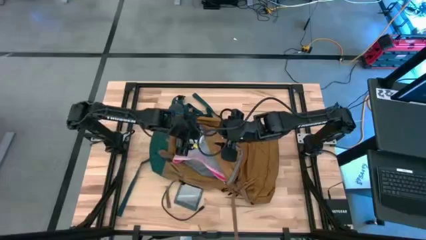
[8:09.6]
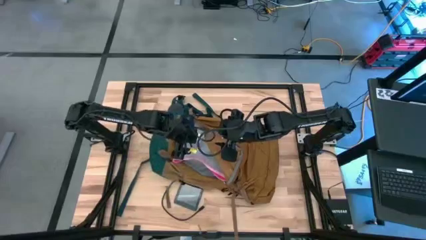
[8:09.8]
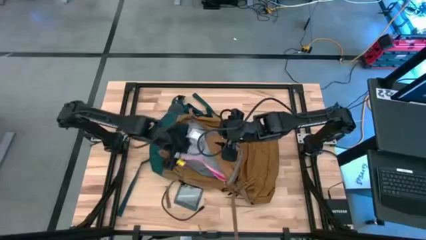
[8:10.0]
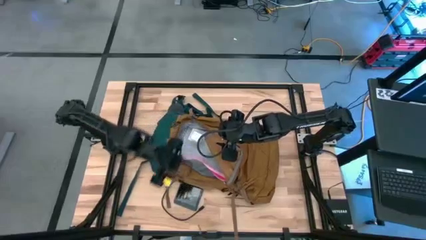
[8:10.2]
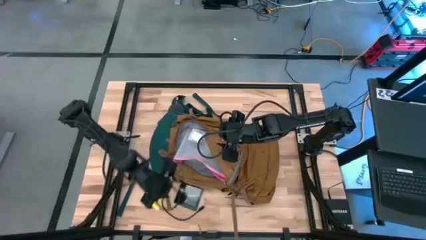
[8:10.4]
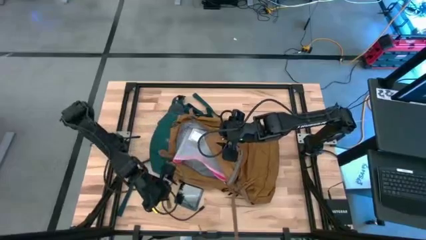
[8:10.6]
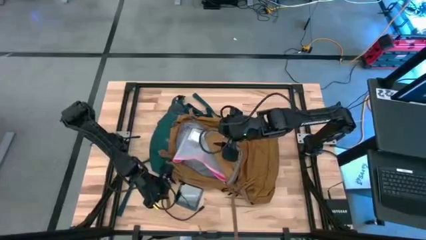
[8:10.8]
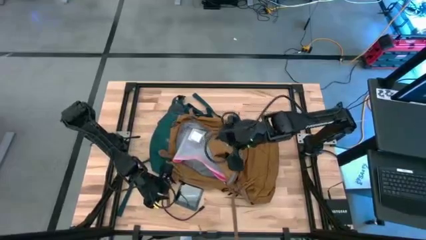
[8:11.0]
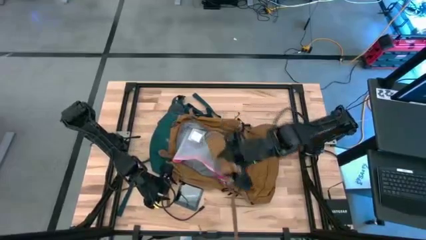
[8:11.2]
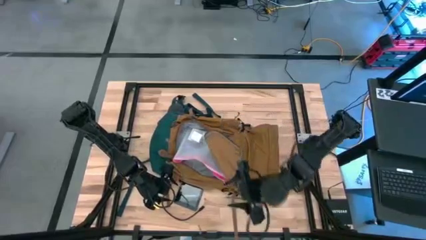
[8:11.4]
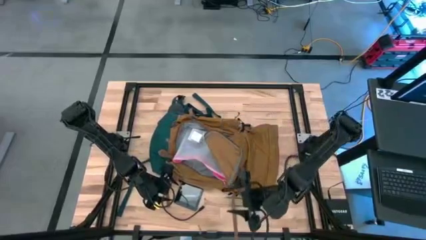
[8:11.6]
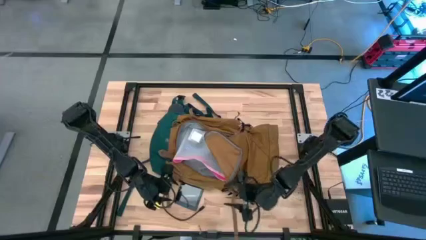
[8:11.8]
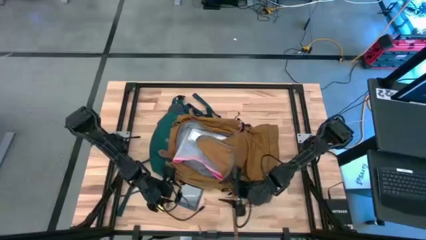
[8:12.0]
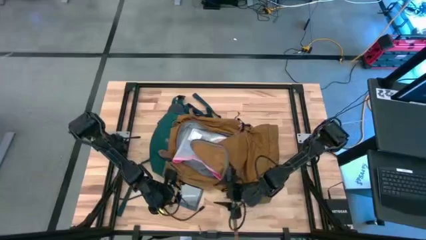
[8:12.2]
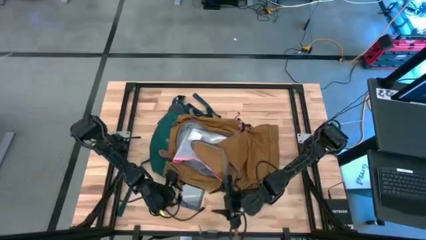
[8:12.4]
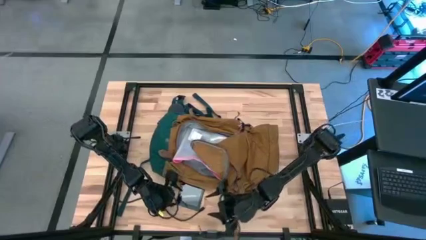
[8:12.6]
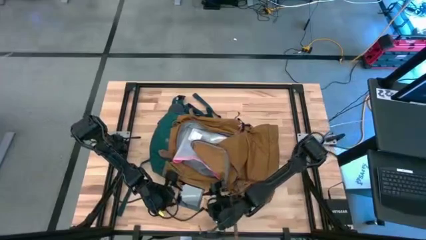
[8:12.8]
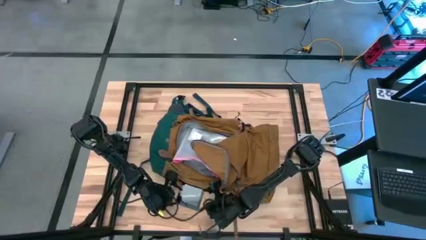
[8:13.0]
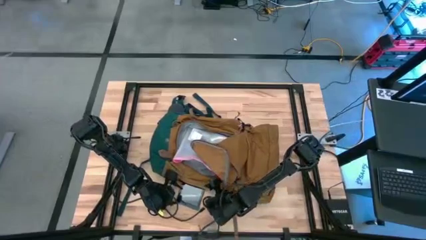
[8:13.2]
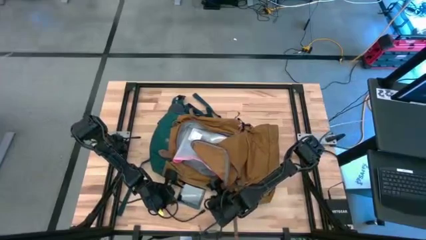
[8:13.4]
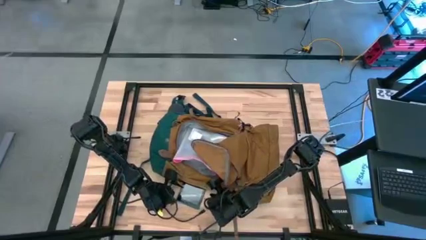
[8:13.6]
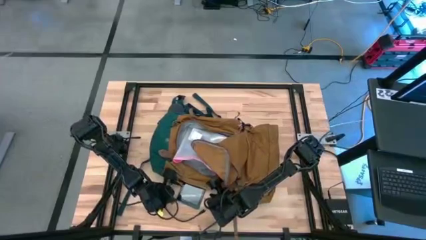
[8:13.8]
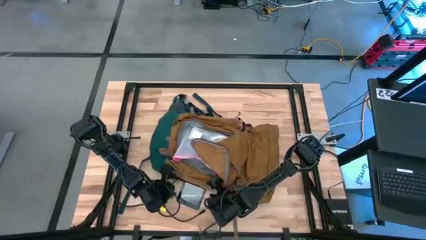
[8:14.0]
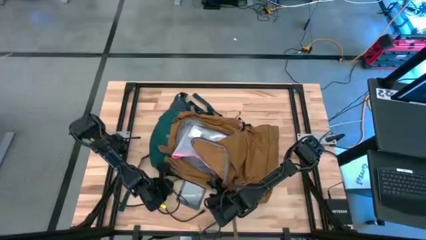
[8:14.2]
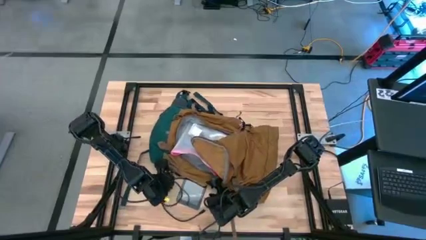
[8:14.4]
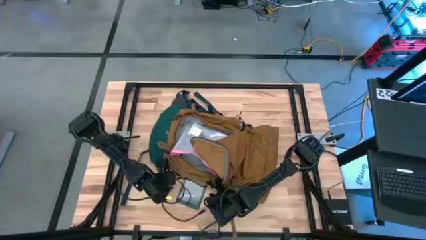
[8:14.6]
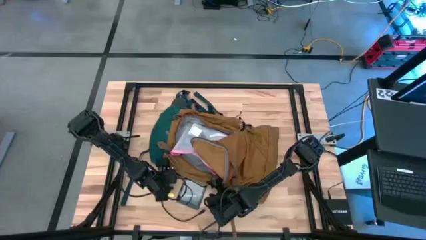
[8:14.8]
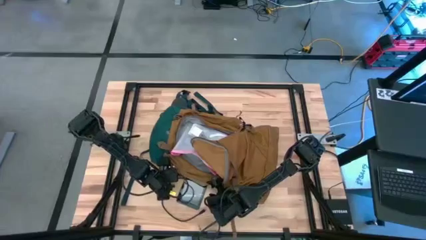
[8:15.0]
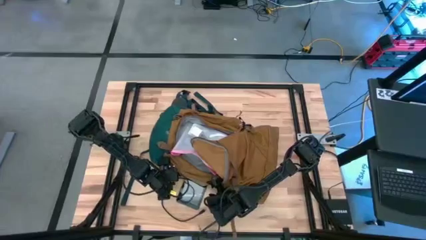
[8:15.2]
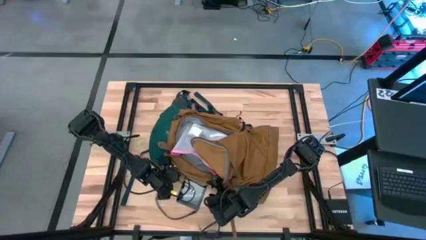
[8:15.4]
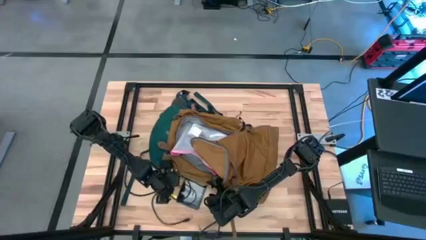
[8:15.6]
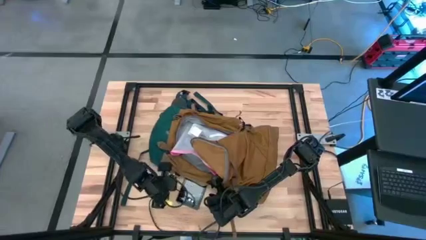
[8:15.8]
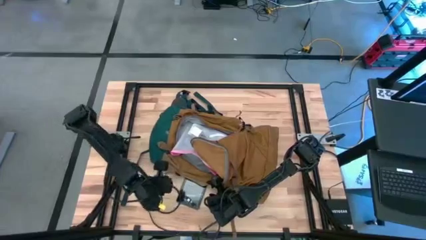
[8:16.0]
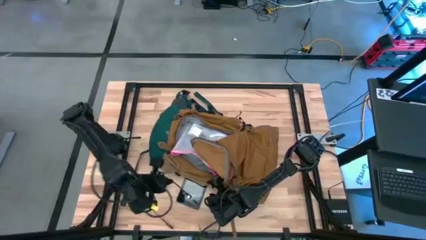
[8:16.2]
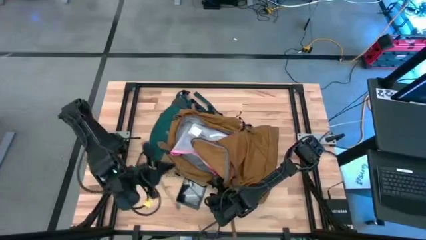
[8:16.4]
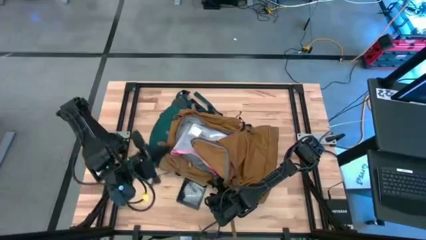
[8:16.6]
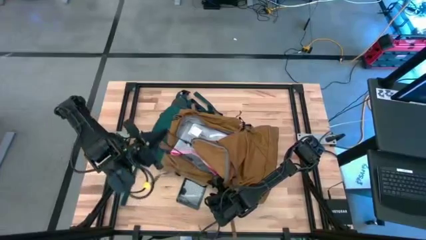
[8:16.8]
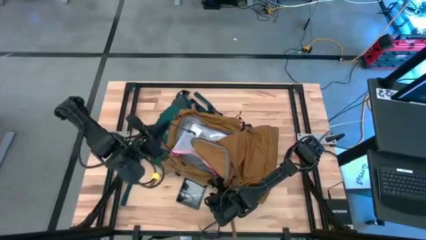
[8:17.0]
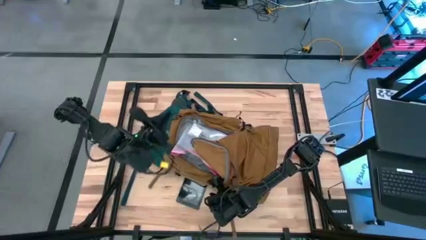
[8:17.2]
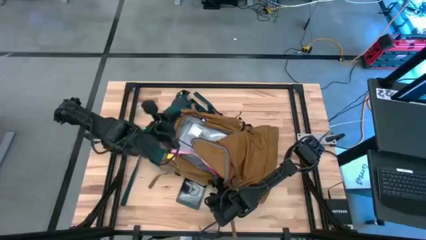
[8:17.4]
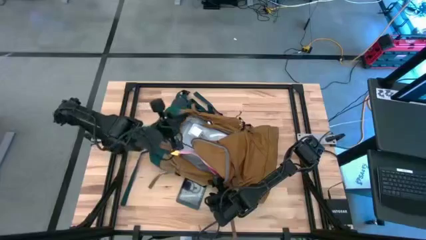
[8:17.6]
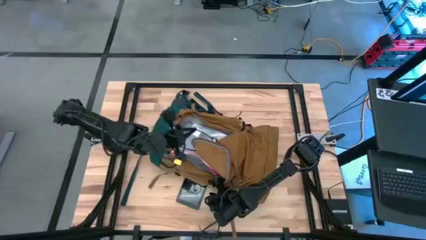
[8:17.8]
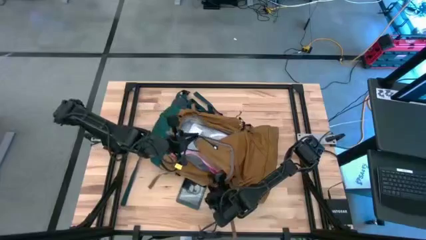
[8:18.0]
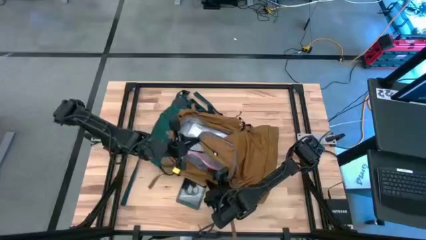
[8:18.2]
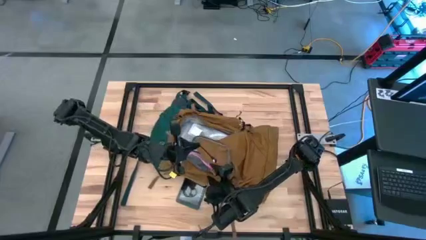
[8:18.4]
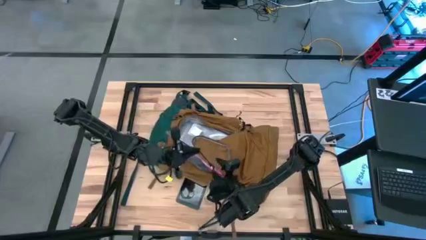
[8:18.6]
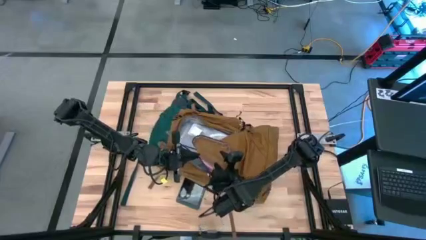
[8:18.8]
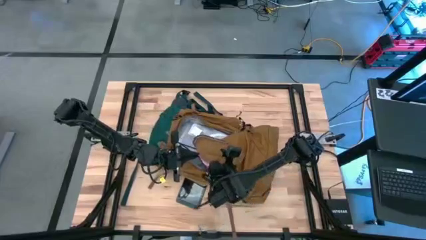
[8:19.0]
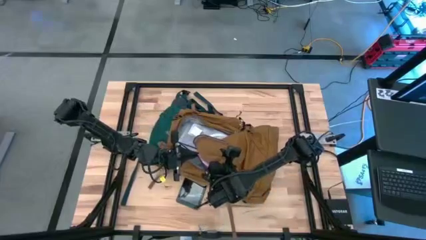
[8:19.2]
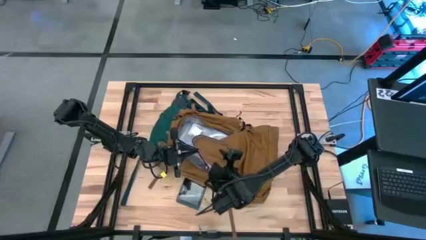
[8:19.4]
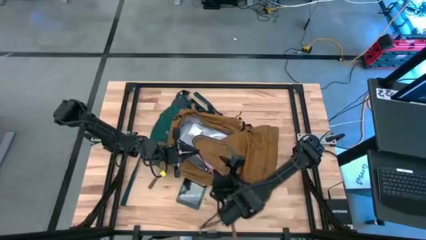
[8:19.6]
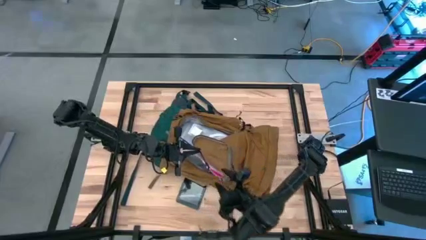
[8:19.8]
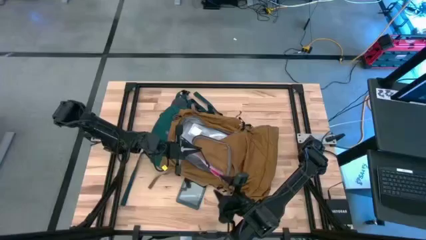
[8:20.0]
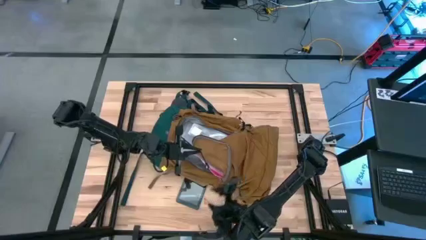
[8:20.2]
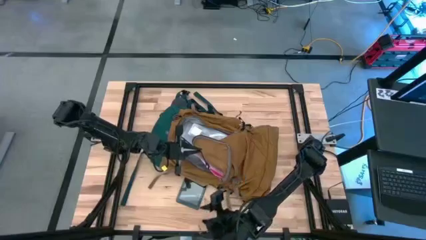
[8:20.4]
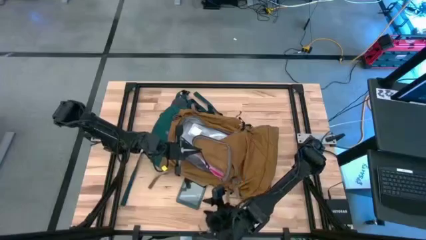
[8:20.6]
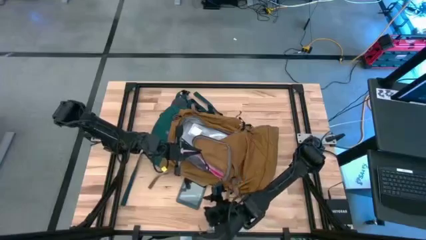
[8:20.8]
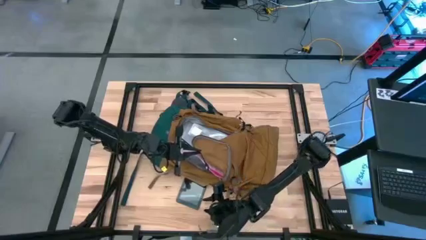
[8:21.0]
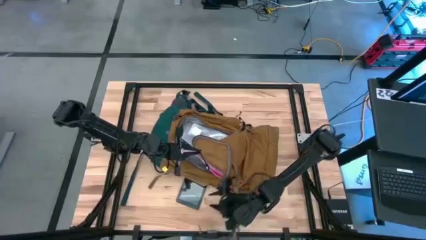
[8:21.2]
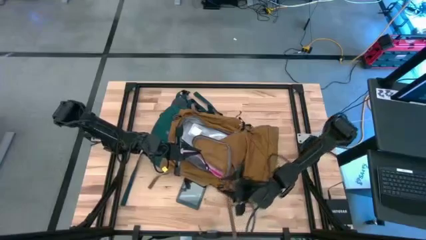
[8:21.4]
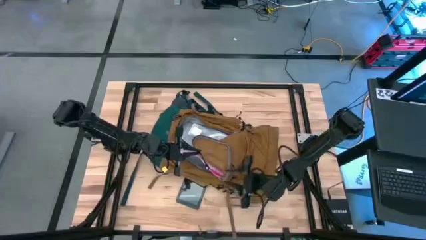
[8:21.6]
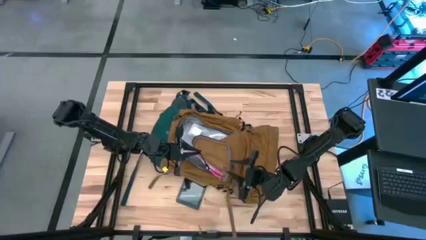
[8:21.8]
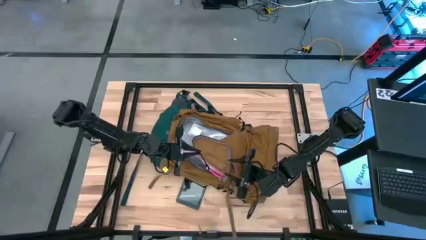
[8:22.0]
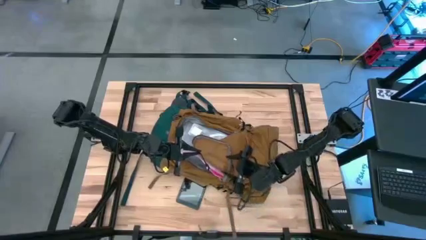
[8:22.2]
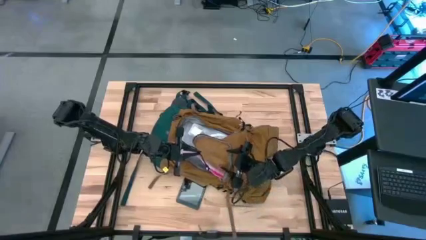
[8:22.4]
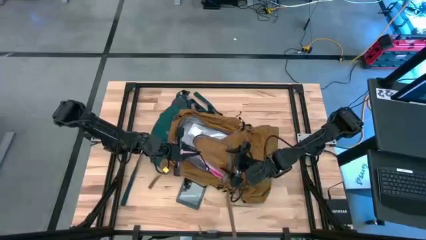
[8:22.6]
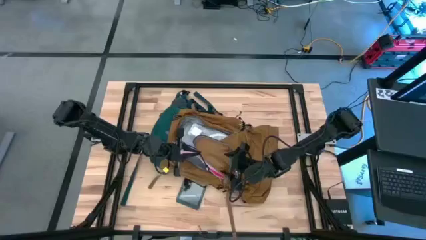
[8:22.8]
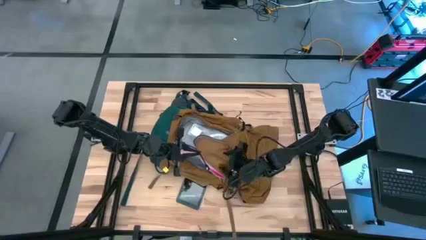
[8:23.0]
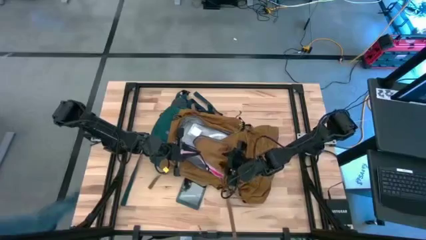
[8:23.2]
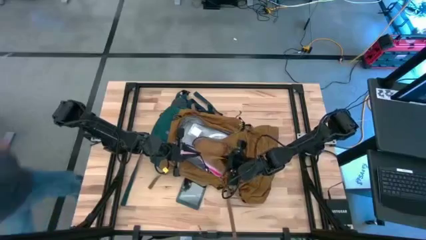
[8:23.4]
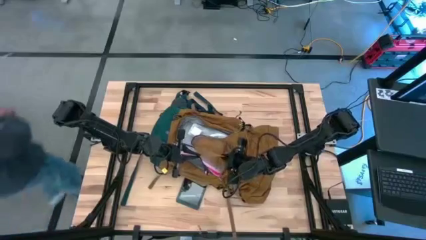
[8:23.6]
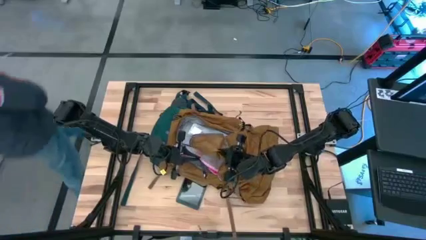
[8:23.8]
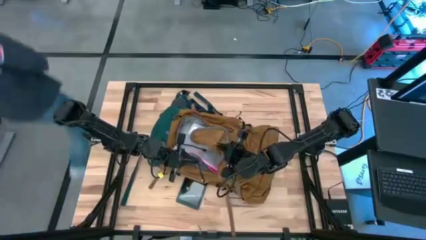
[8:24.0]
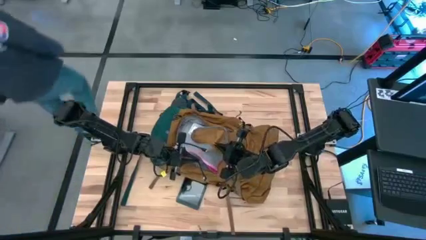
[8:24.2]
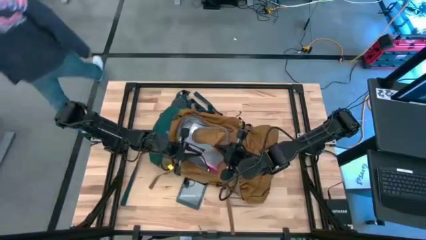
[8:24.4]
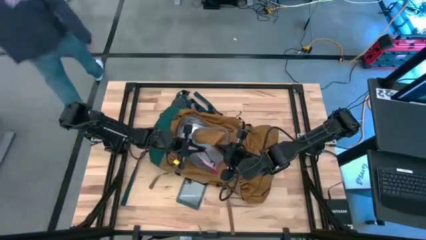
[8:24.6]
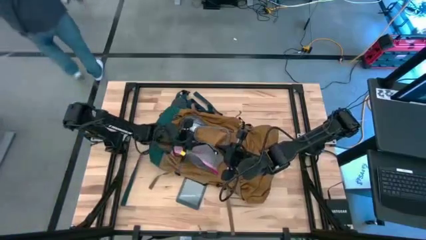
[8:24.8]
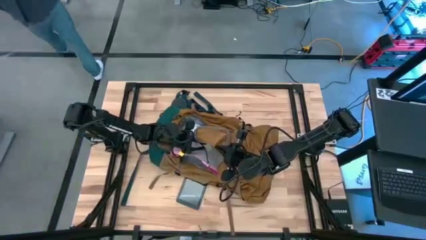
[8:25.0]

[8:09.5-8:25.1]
Task: Unpack backpack
Put the black charger cable into the brown backpack

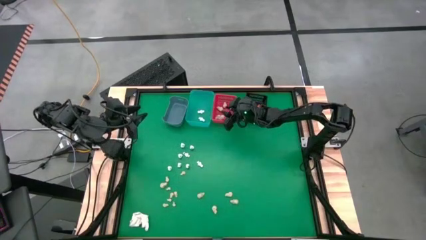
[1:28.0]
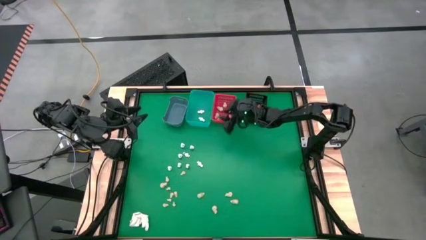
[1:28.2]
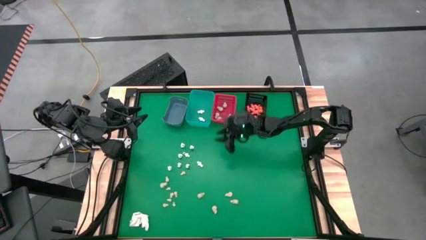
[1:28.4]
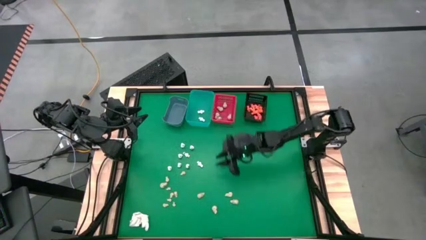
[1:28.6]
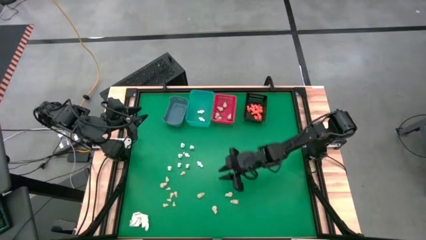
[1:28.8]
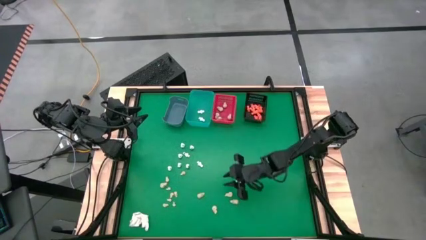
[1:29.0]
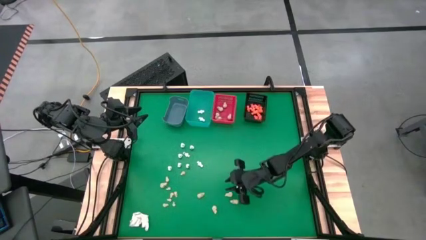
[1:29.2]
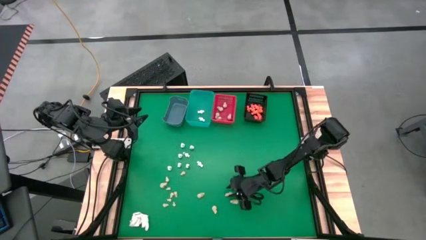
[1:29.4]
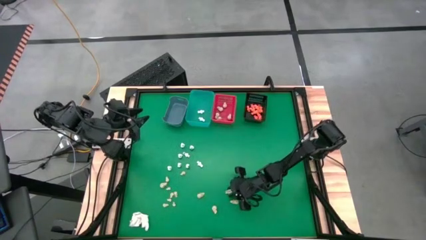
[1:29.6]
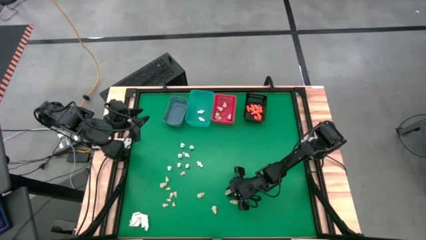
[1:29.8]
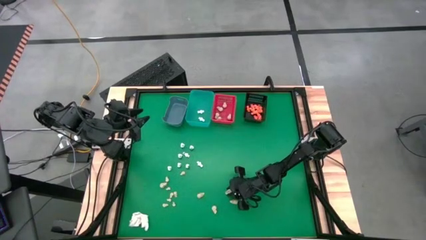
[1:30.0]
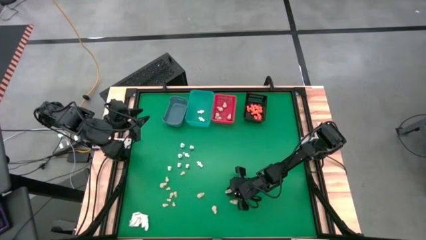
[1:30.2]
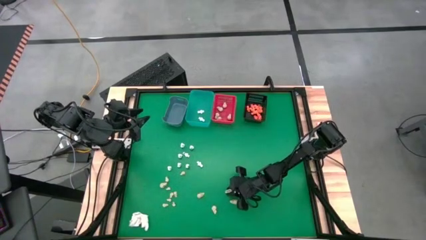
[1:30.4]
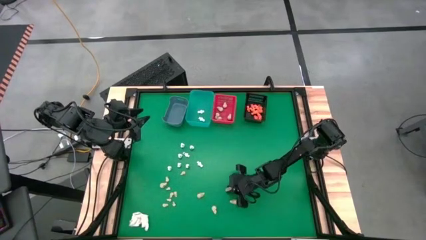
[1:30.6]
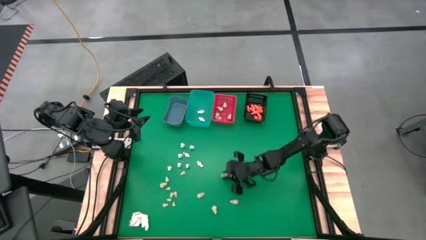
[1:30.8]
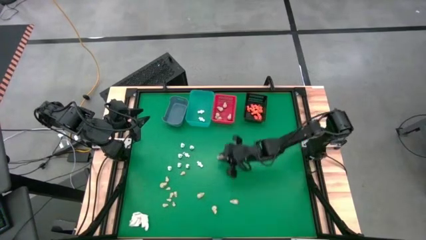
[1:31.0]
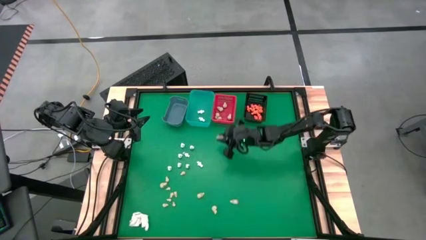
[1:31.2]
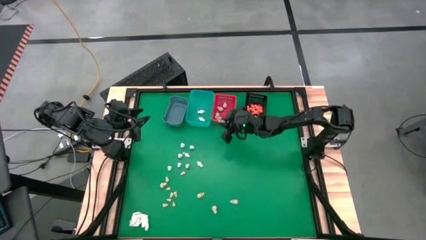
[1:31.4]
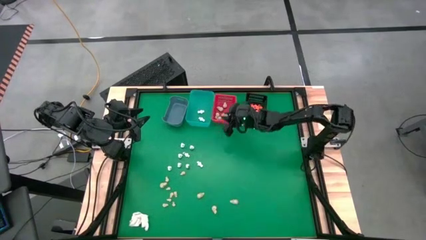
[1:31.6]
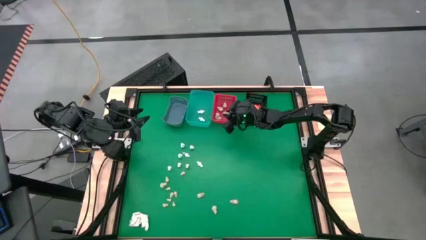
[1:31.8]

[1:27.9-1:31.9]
Task: Sort Halloween decoration
Put the white skull toy into the red bin
